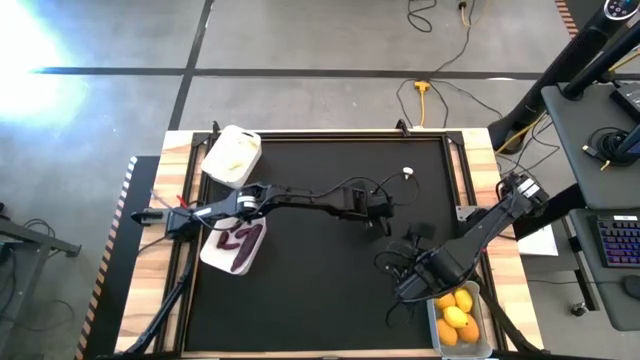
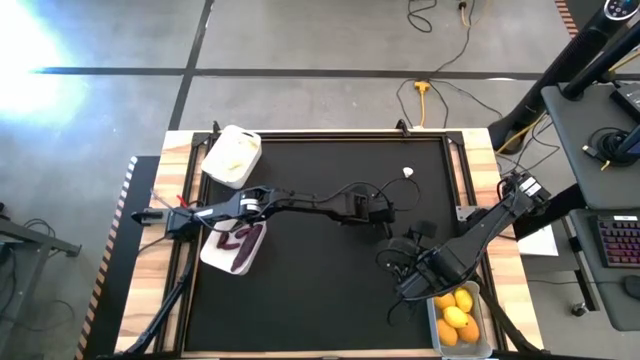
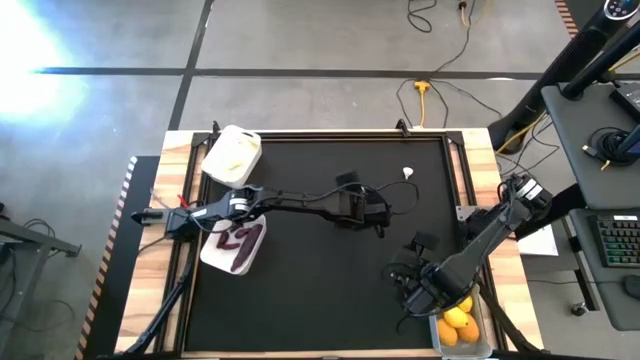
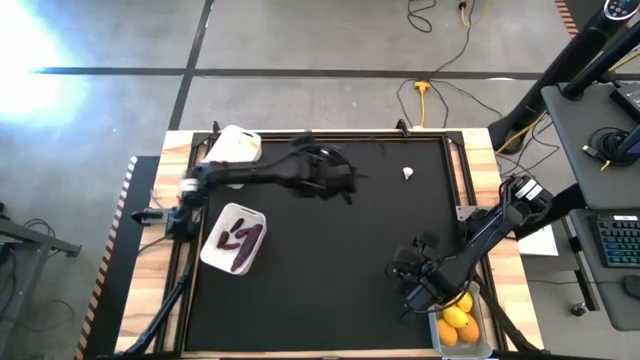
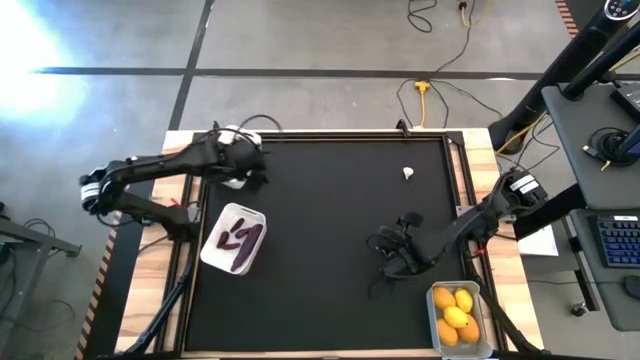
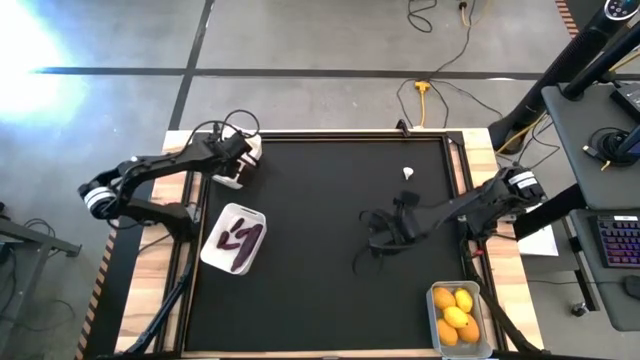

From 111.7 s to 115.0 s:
Task: Sort produce into baskets
Put the garlic into the top white bin

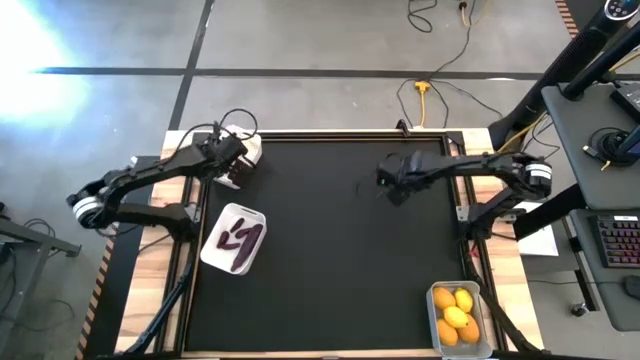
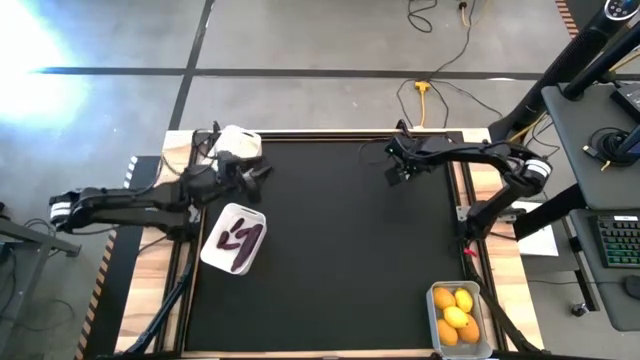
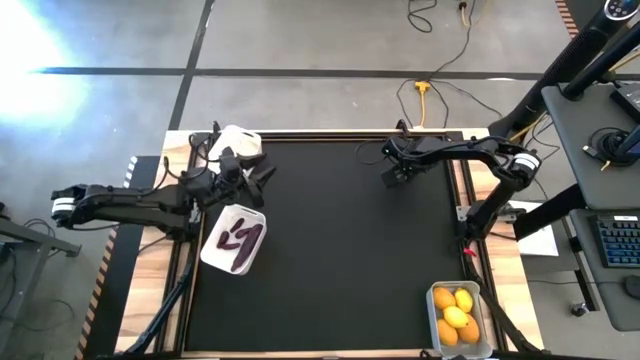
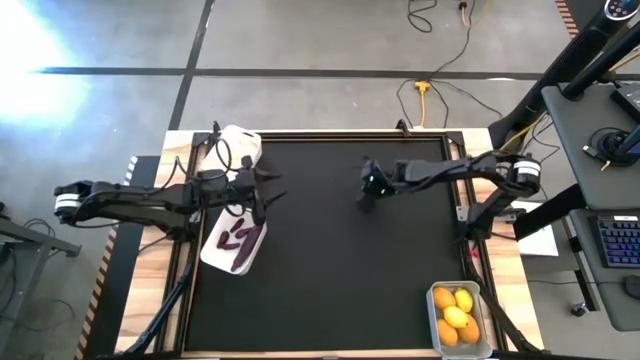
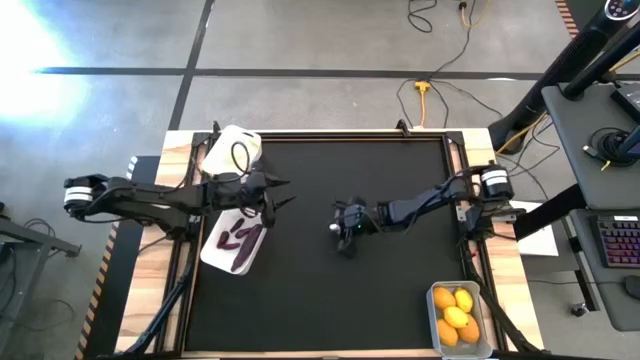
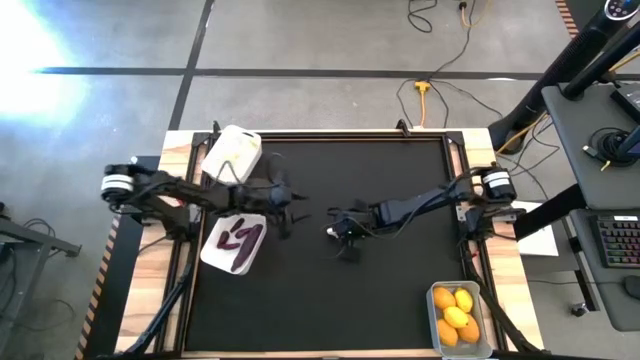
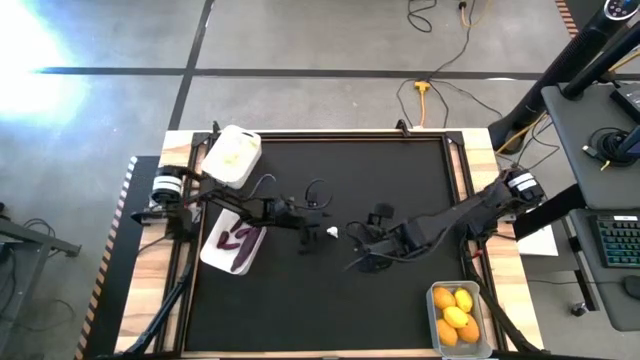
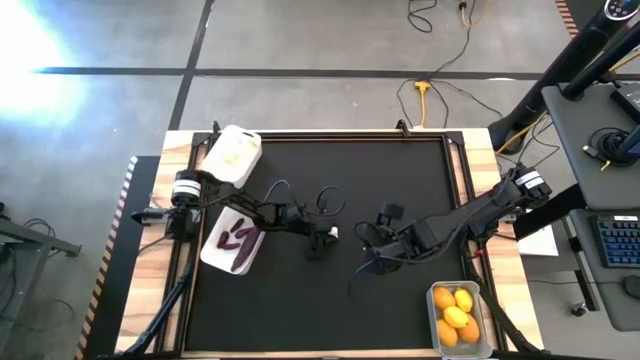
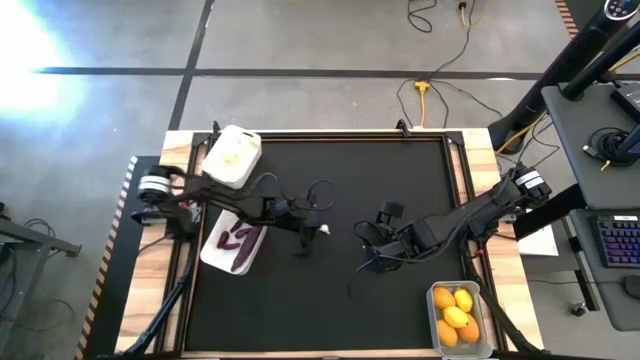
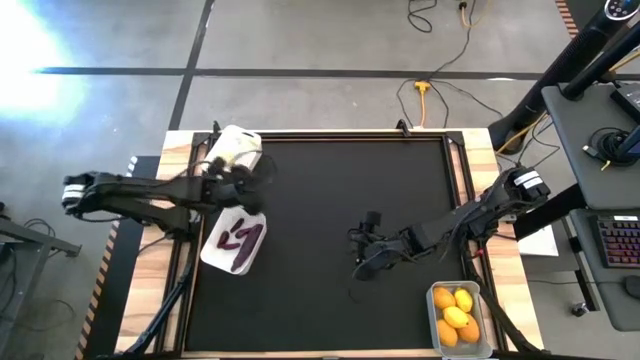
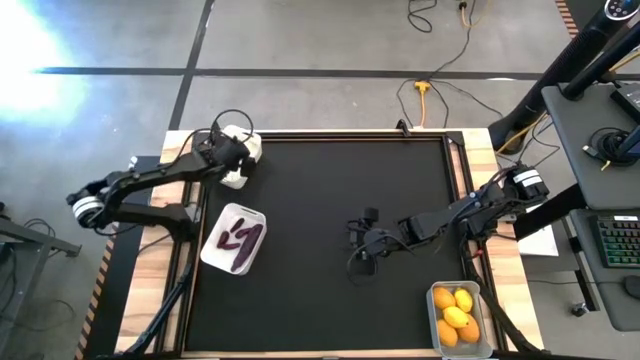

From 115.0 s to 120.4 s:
Put the garlic into the top white bin

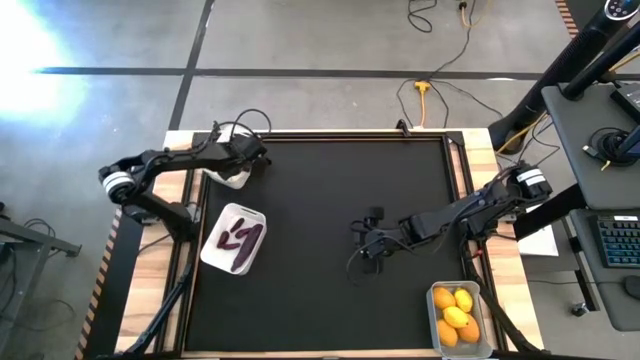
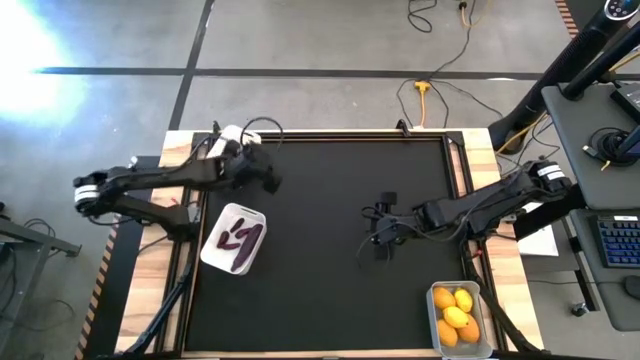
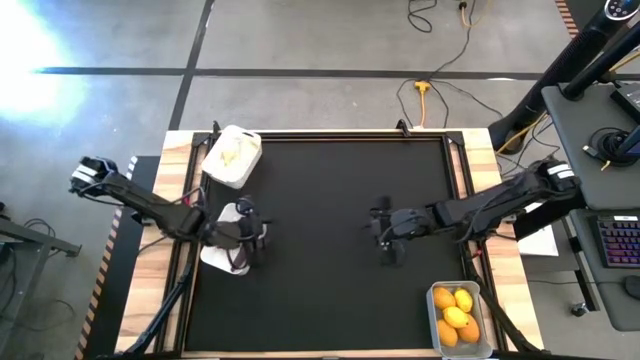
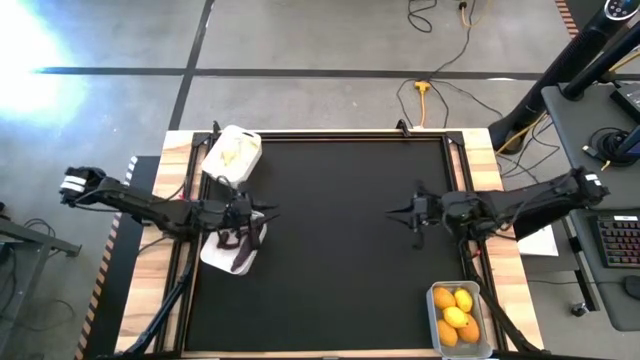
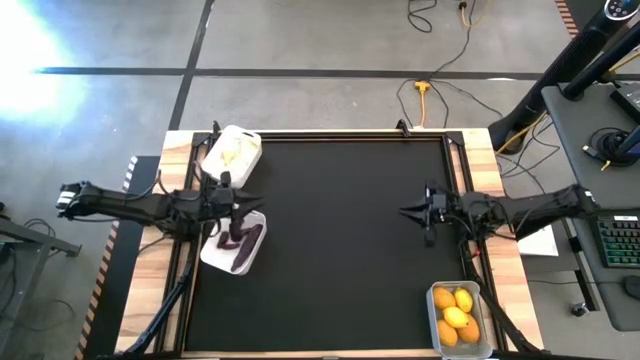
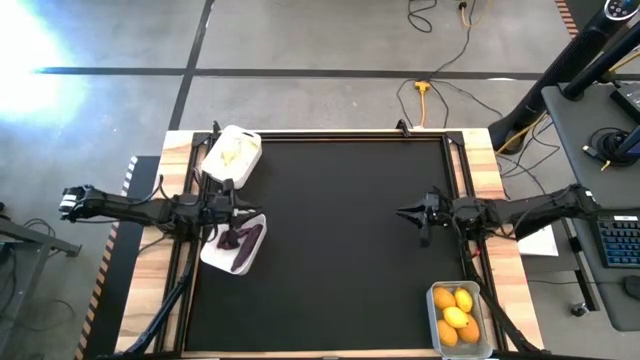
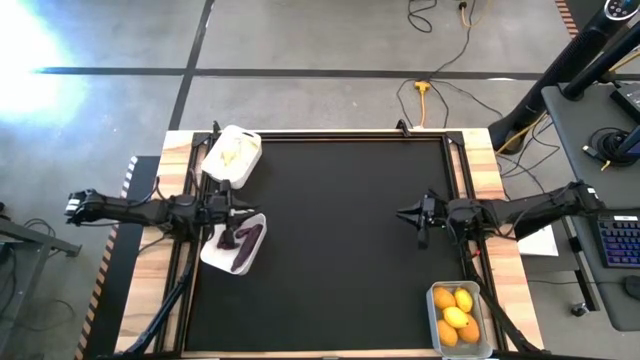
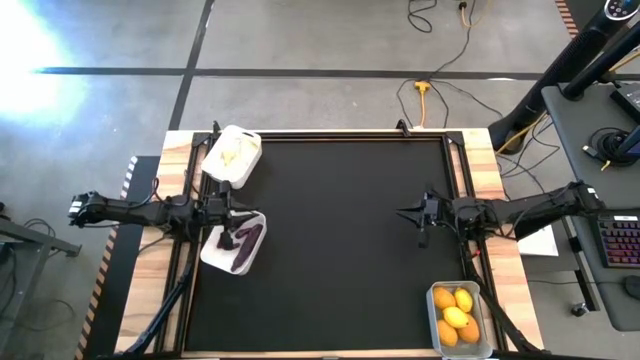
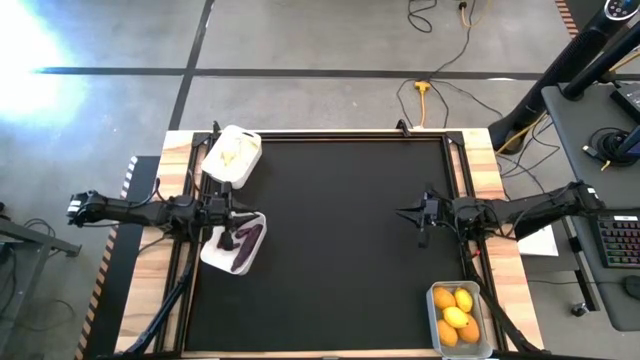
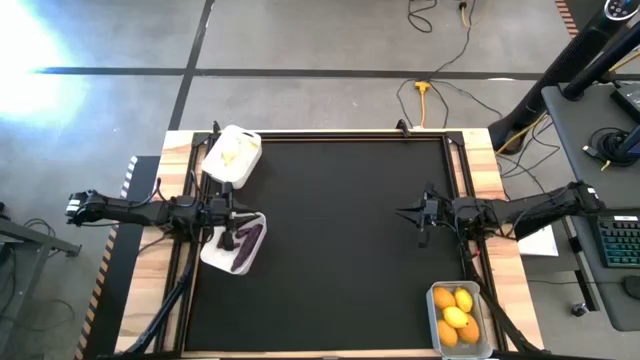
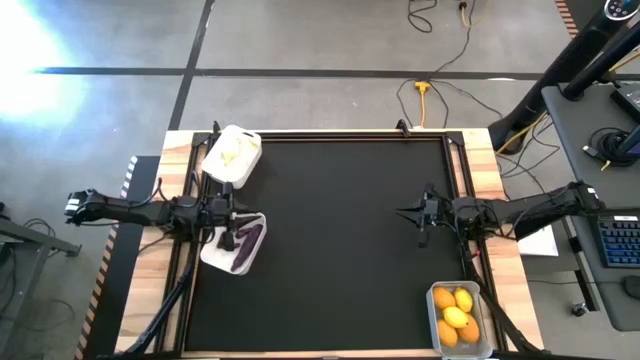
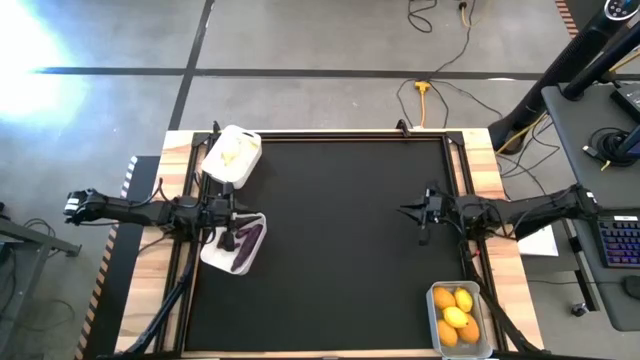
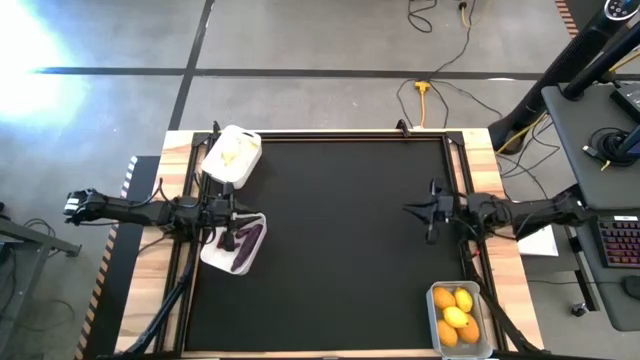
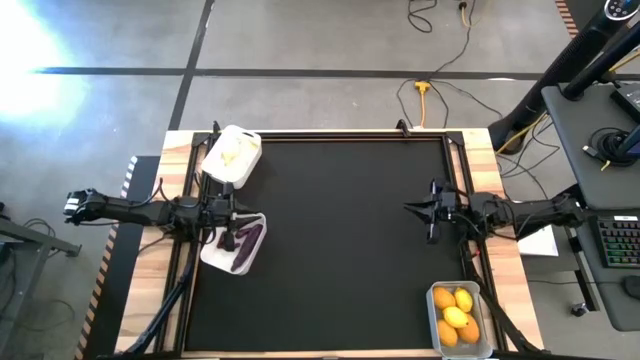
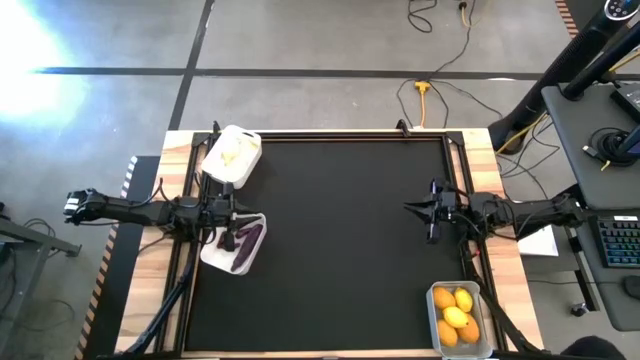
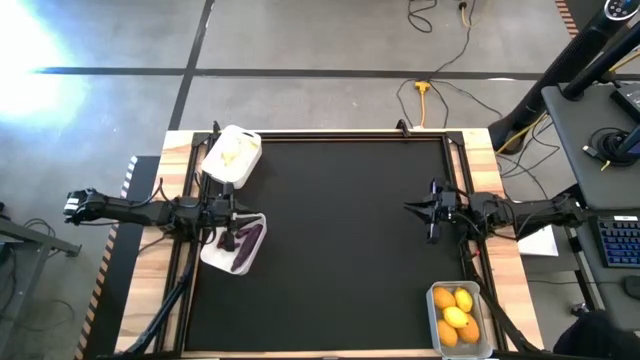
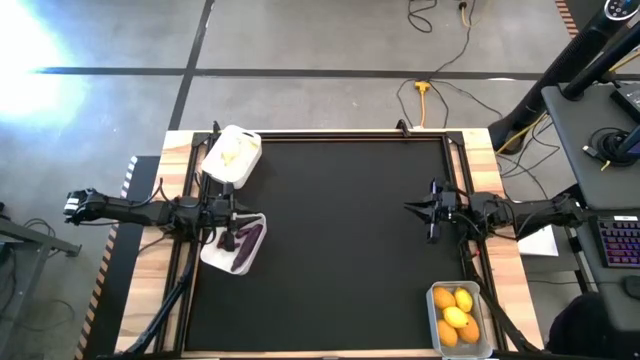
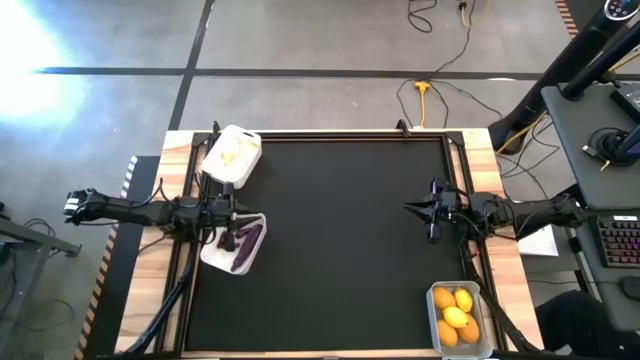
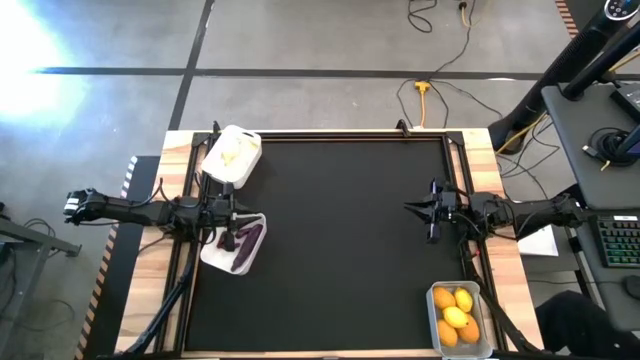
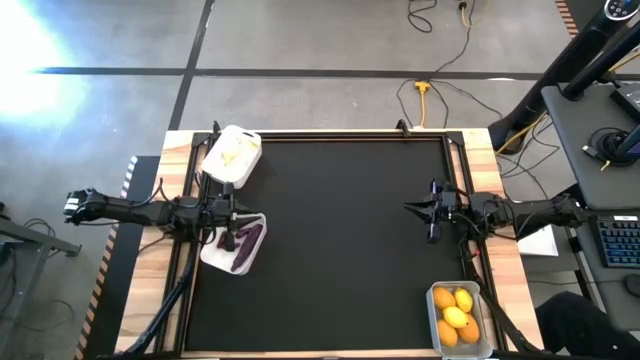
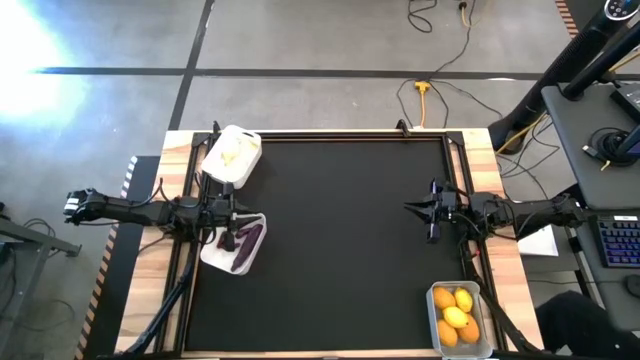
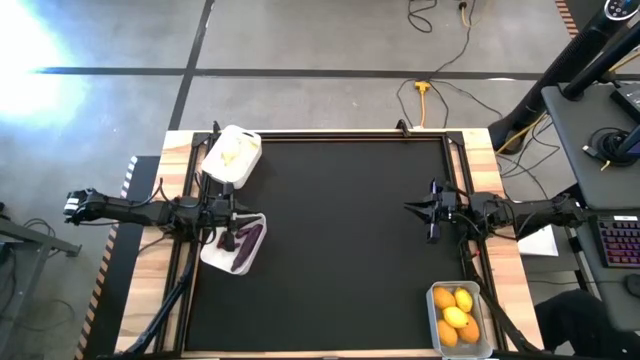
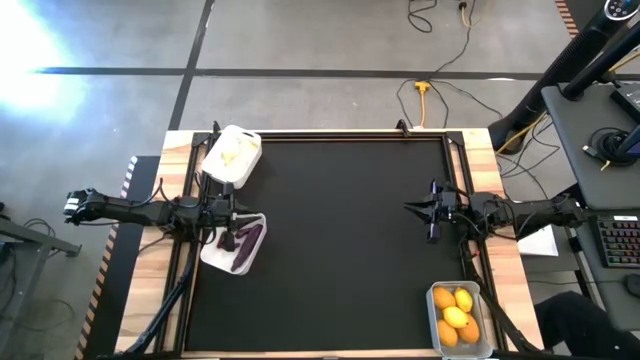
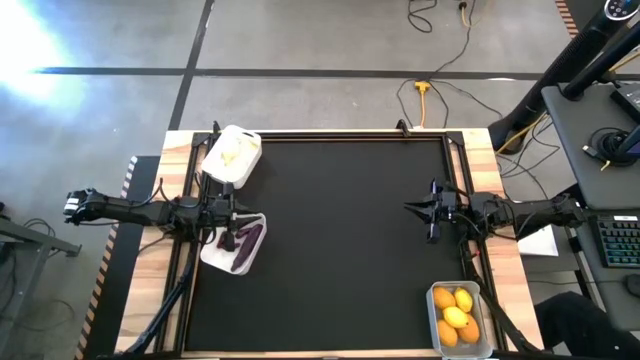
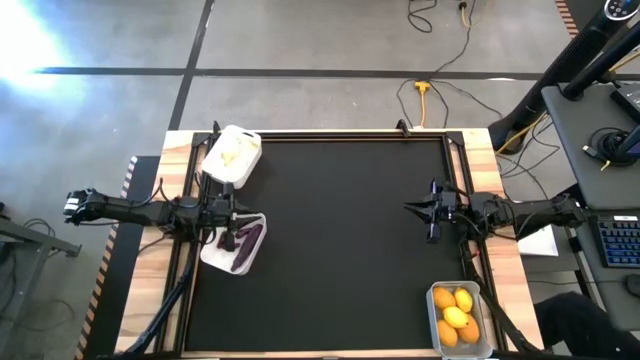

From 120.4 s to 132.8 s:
Return to Home Position

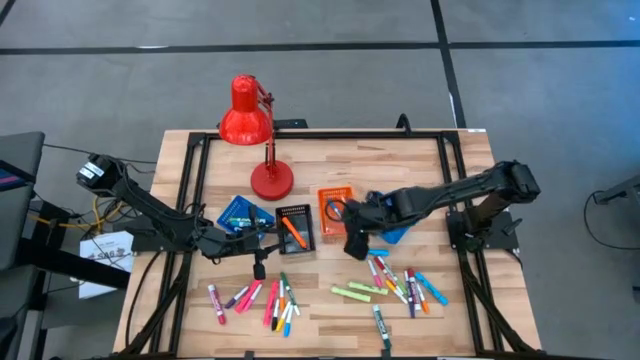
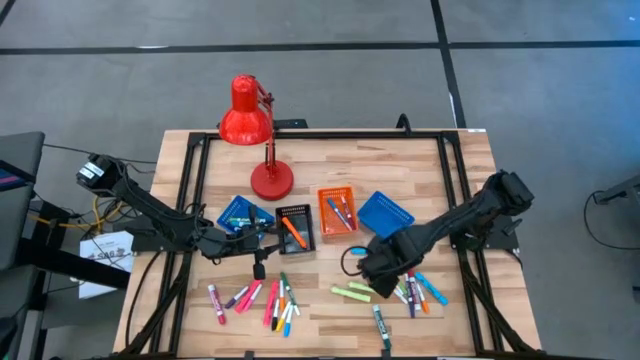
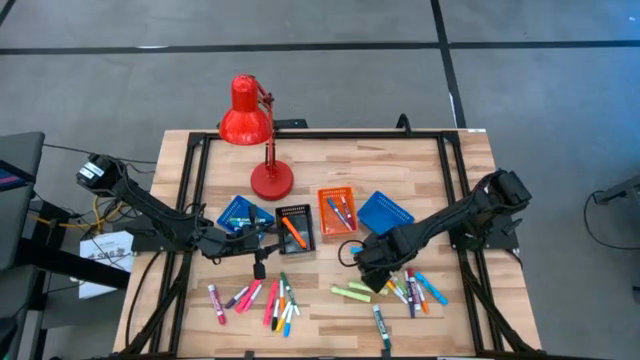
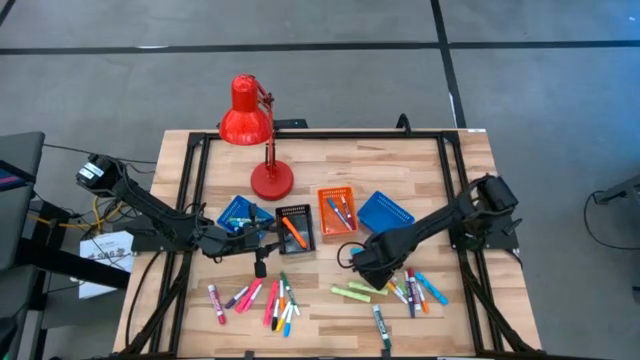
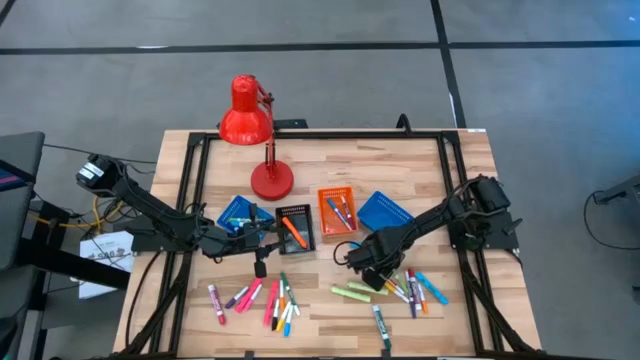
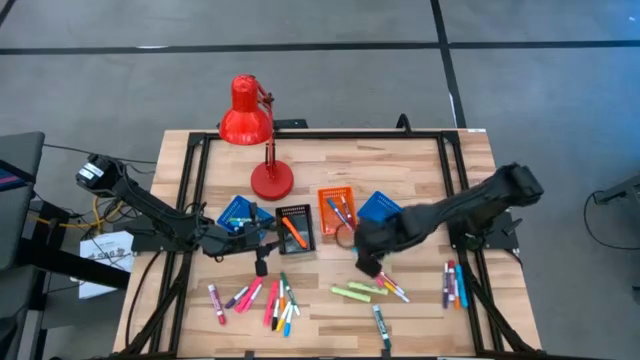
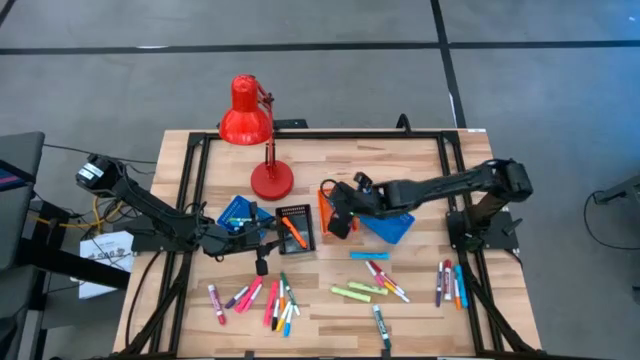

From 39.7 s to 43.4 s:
Task: Pick & Place Markers
Put the small light green marker pen into the orange basket
